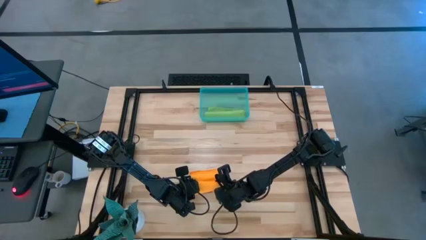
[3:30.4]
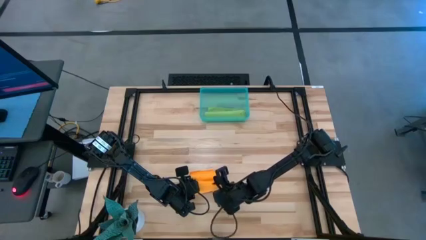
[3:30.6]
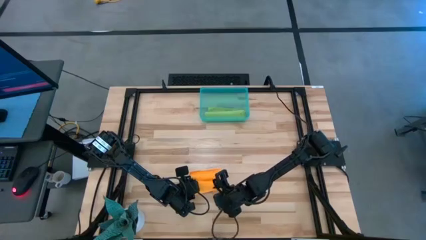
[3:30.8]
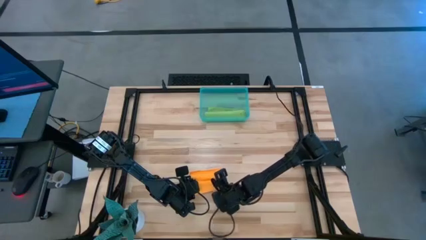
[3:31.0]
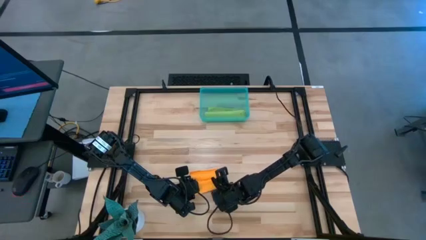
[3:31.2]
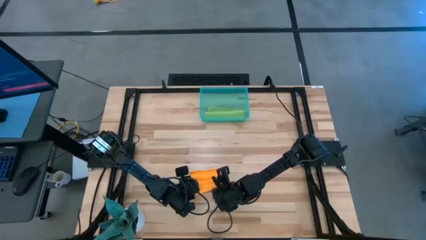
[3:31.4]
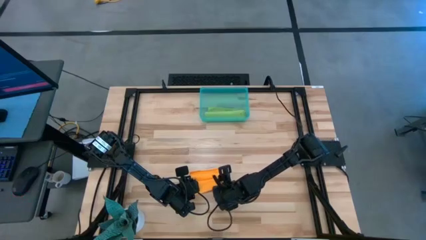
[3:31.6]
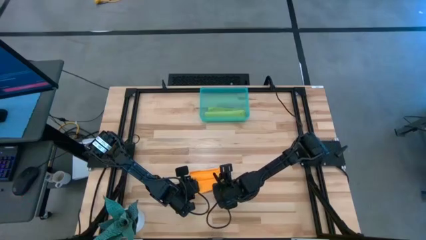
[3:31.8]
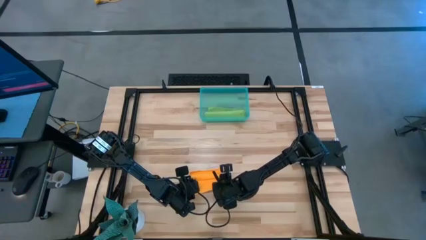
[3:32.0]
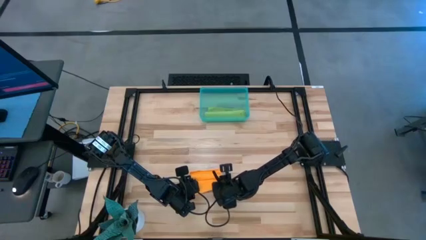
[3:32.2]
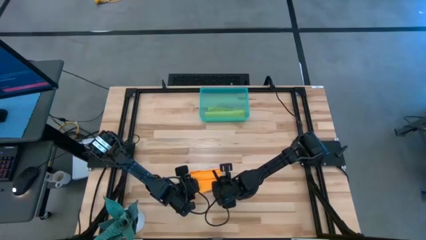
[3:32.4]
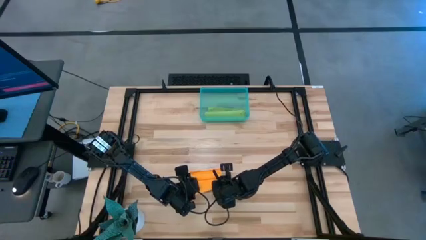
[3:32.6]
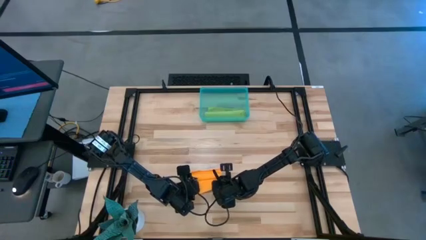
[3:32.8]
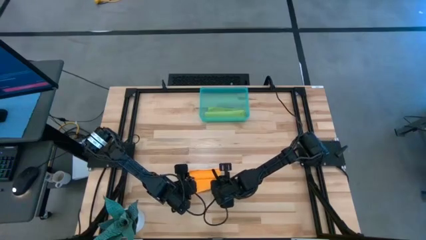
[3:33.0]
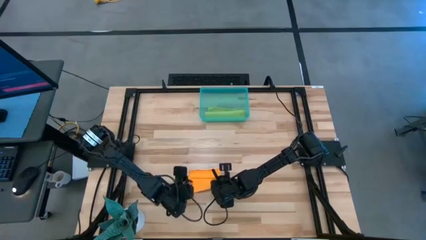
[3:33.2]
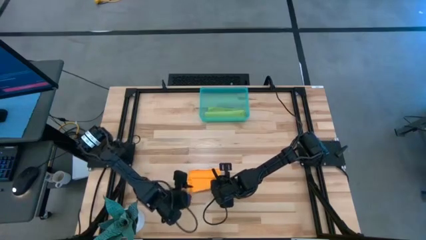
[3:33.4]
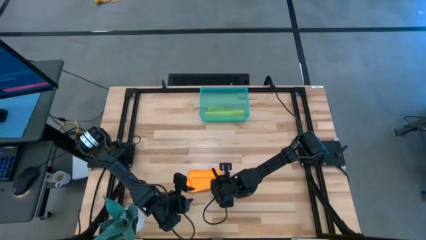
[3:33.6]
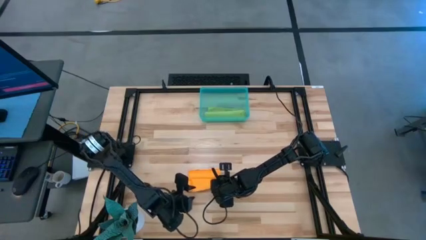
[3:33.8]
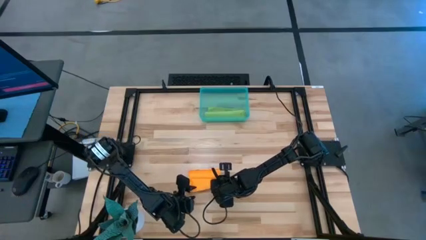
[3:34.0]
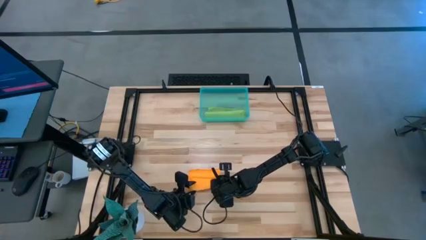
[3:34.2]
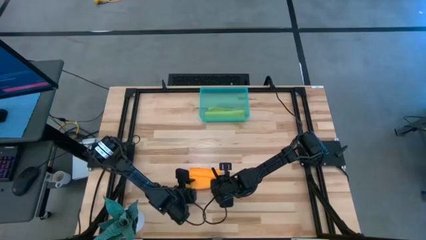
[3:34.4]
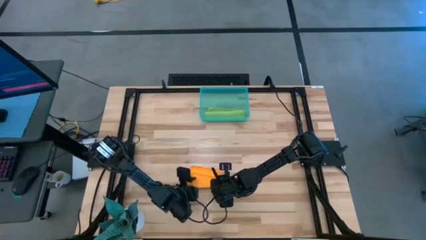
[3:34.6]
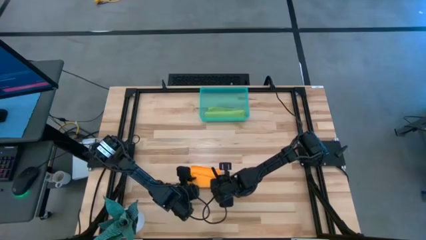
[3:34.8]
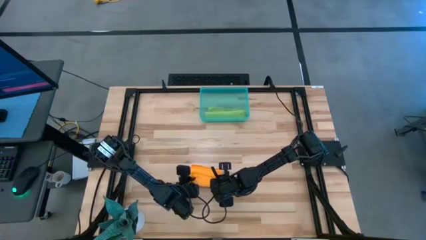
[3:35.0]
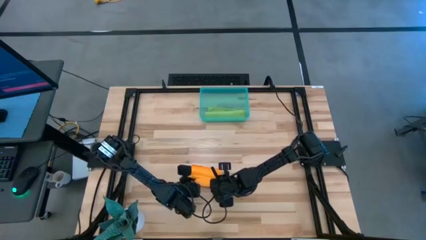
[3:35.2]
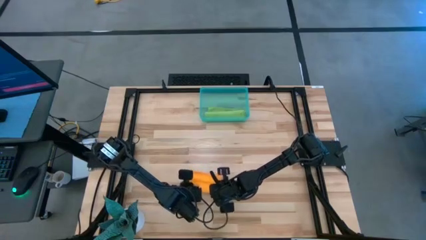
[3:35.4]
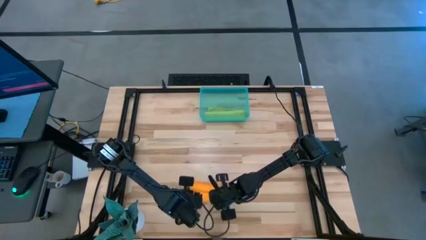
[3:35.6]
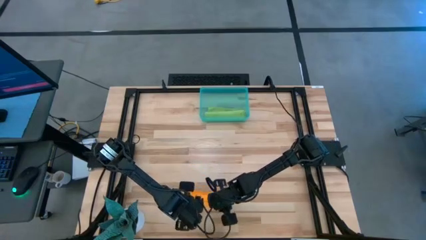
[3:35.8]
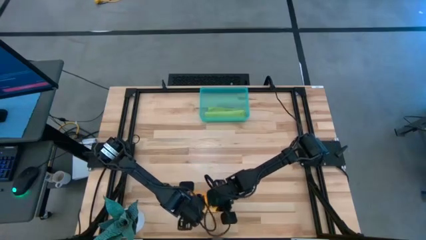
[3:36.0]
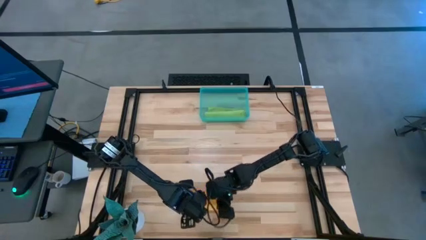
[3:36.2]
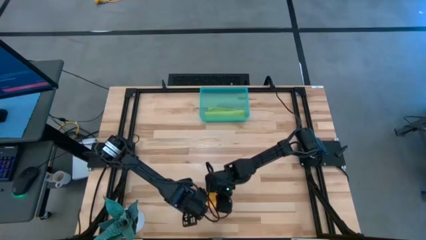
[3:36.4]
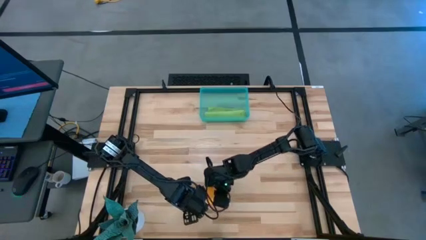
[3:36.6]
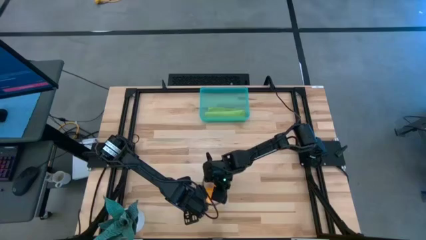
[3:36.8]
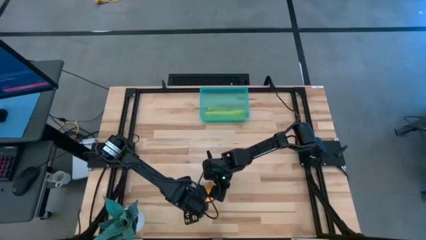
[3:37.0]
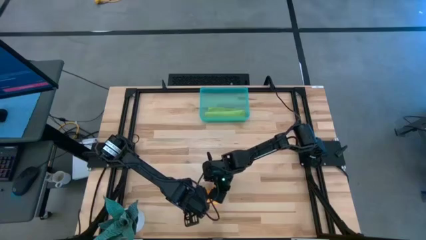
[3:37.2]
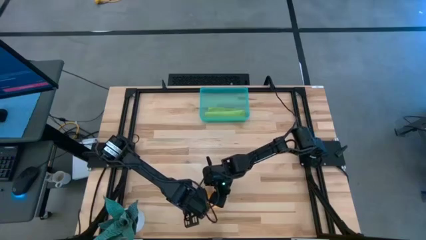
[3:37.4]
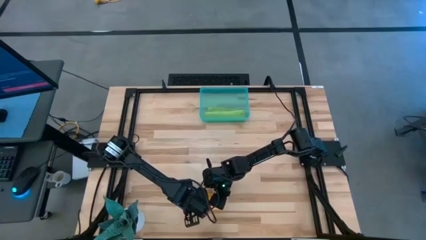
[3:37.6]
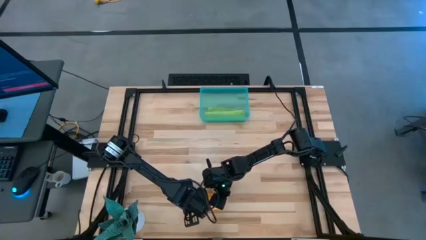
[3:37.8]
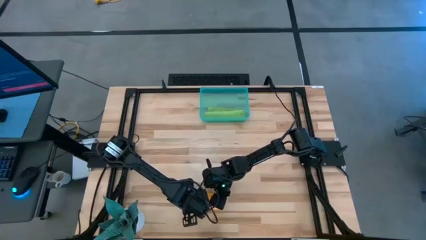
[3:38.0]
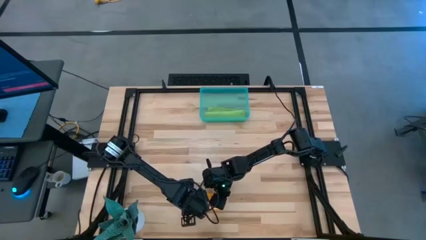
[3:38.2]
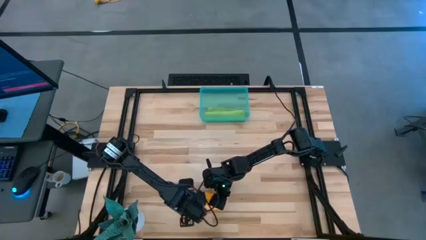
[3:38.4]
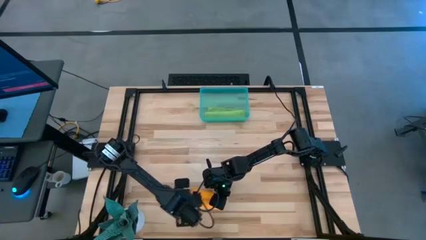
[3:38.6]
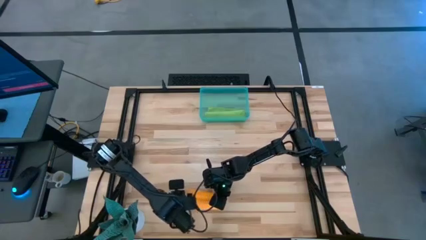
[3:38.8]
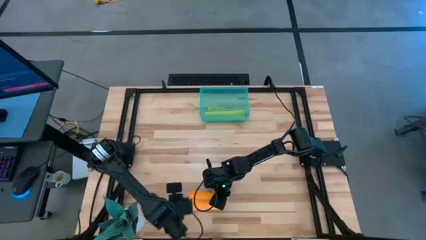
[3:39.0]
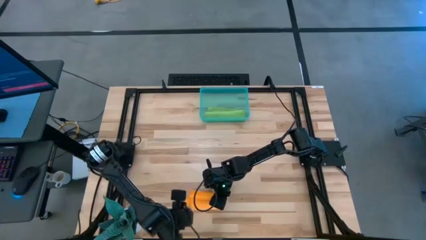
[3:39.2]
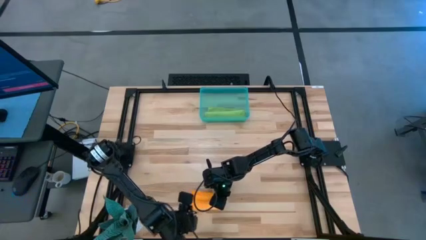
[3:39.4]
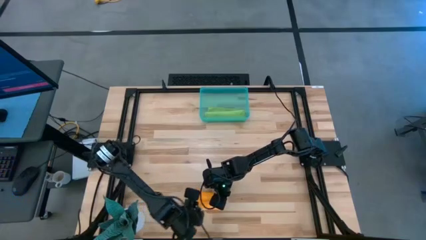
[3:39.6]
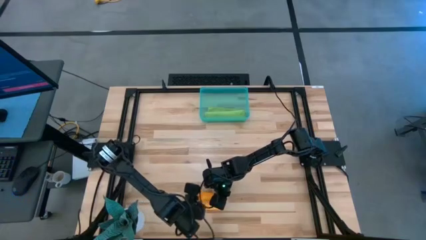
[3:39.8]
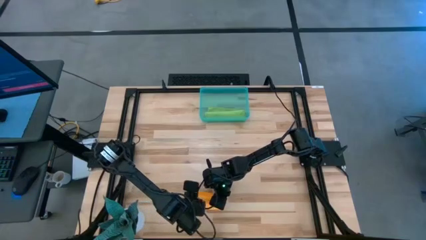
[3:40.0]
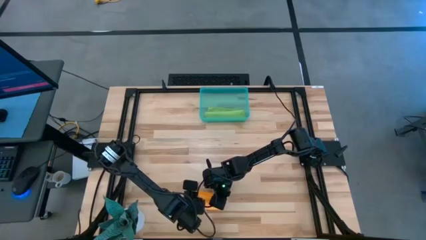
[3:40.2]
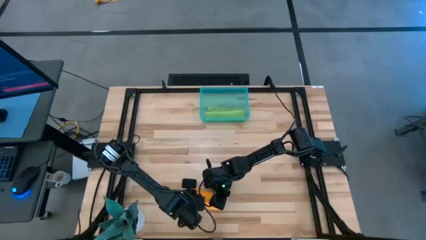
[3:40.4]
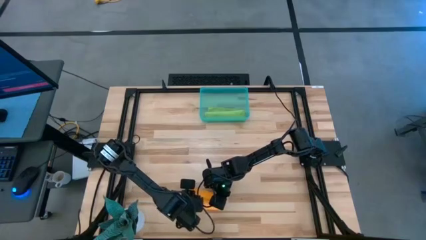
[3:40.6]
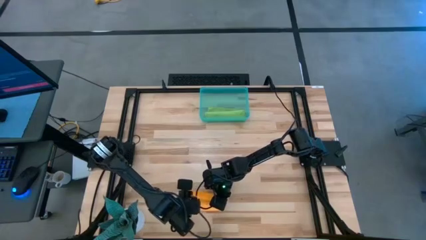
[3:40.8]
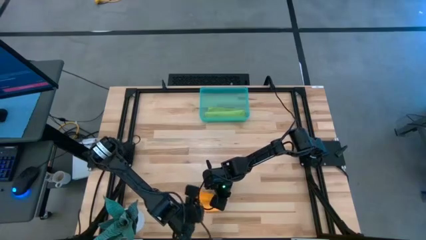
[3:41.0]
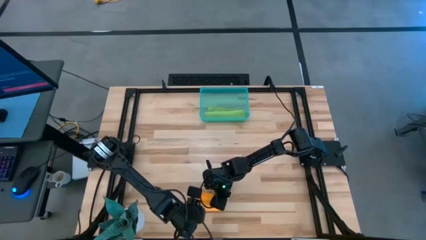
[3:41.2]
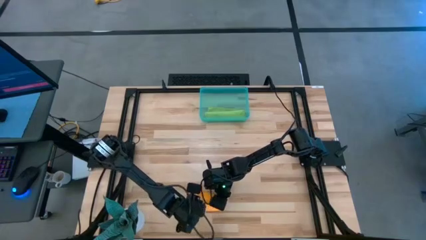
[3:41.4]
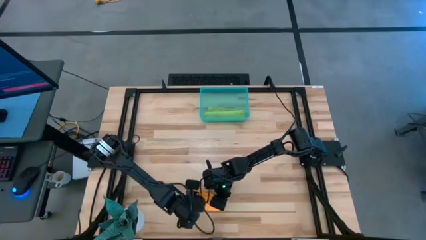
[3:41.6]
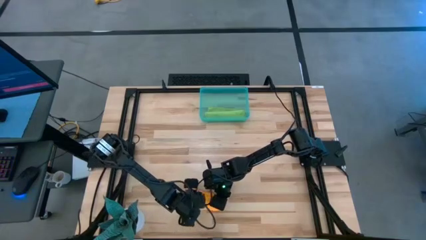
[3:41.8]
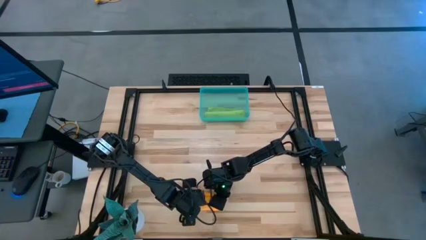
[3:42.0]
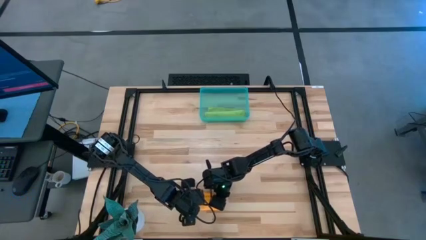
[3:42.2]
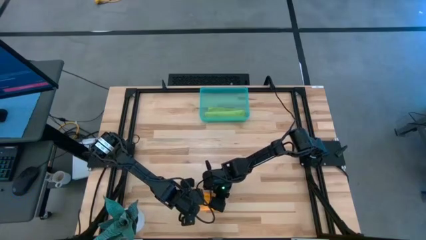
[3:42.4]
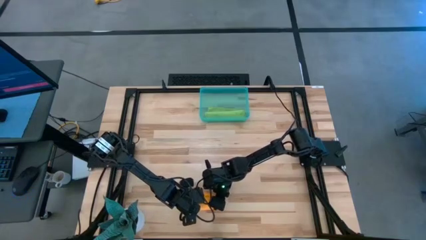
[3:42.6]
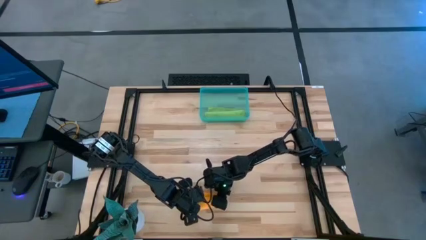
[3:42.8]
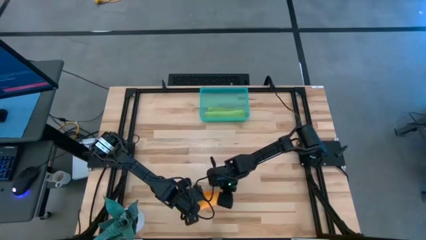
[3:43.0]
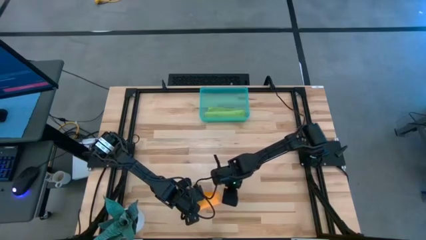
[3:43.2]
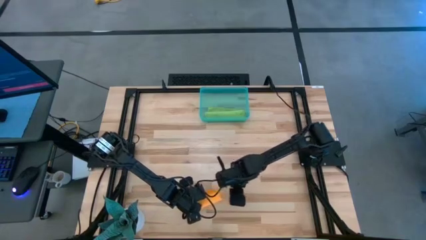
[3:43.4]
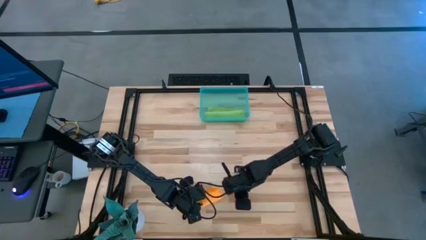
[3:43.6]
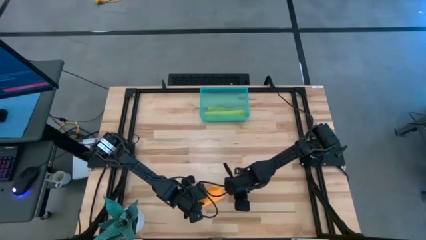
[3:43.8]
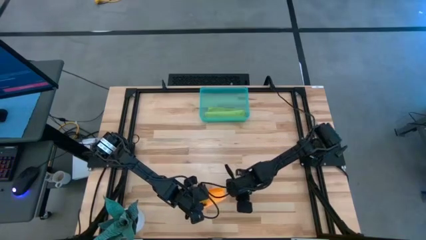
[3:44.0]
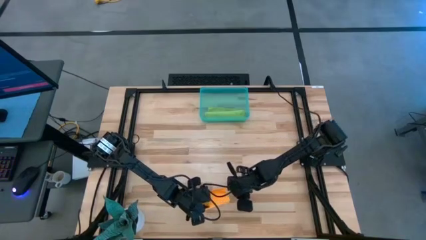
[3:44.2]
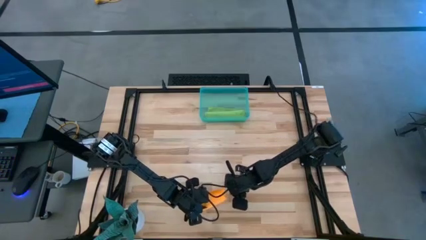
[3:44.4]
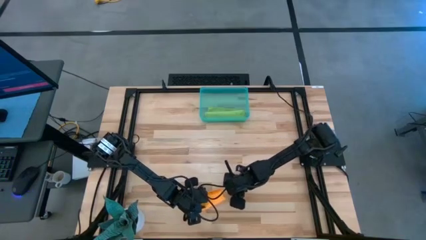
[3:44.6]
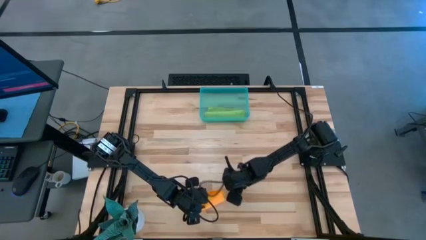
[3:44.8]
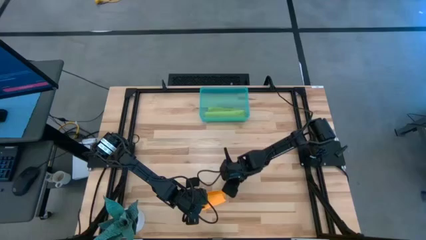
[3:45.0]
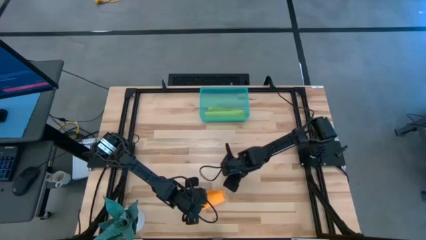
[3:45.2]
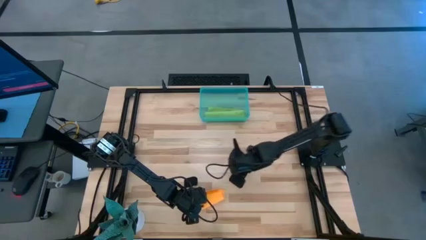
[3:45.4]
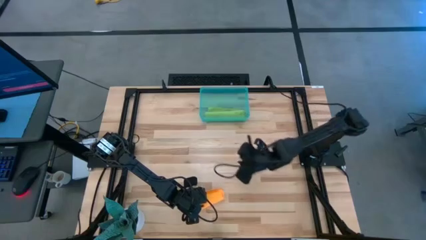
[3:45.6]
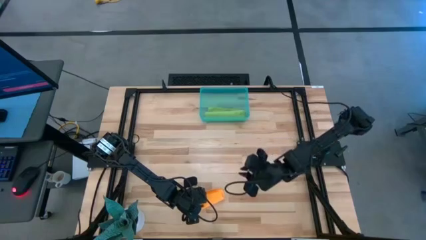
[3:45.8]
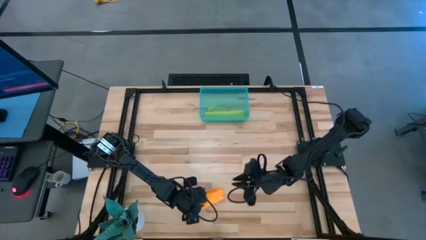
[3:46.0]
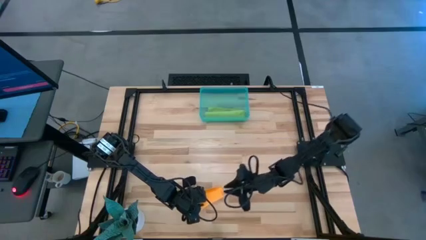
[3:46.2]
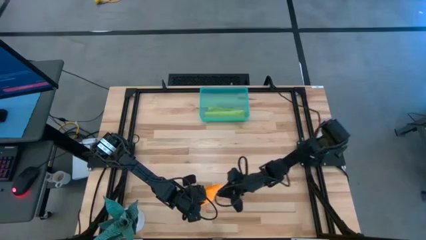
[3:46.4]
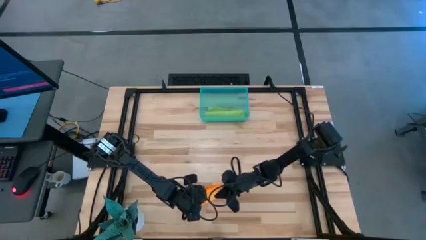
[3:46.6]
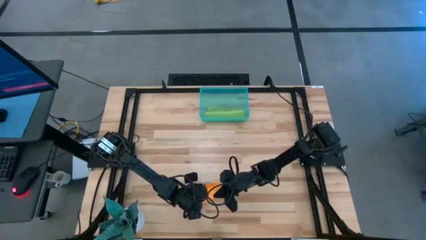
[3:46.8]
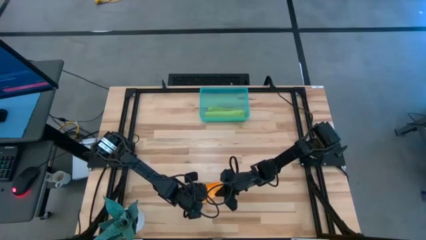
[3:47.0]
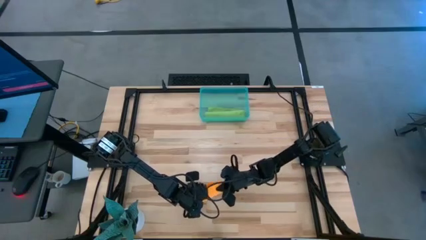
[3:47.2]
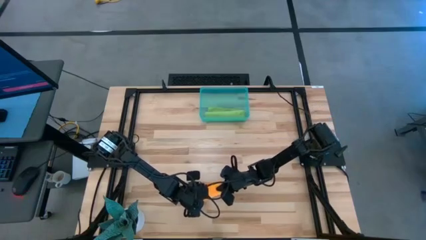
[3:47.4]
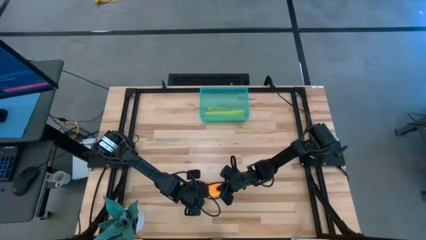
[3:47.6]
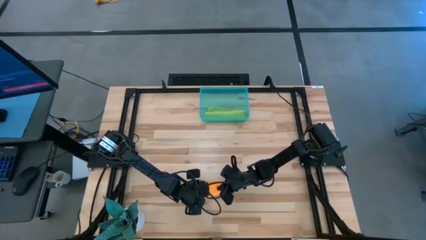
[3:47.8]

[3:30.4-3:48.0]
Task: Roll microfiber towels into tight, uniform cylinder then place into a basket
Roll the yellow microfiber towel
